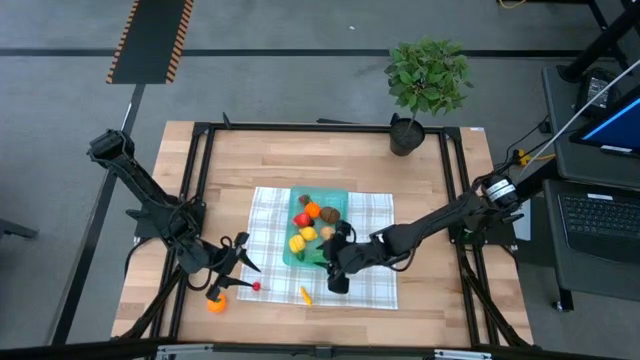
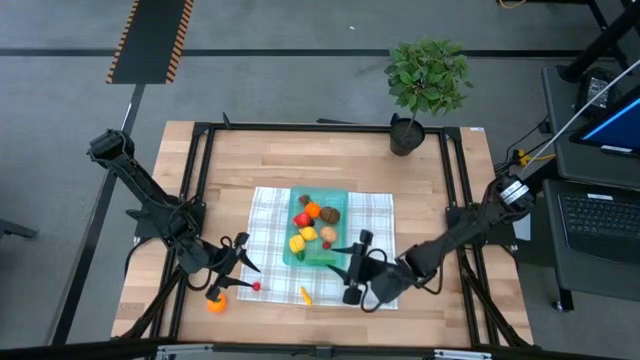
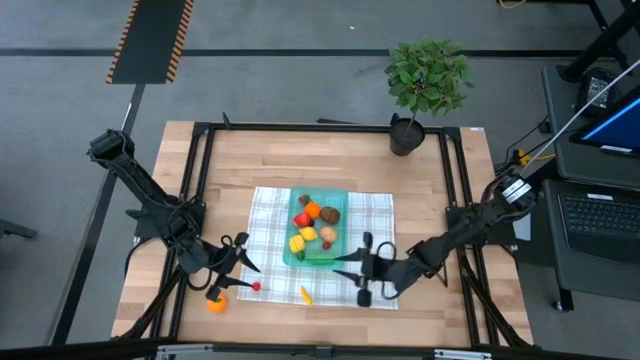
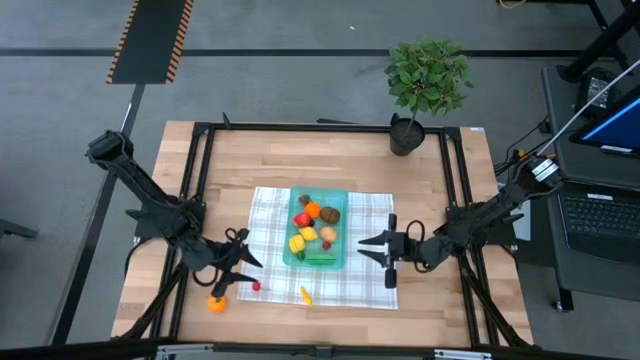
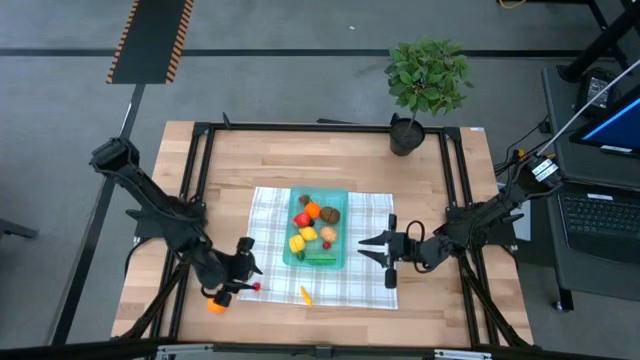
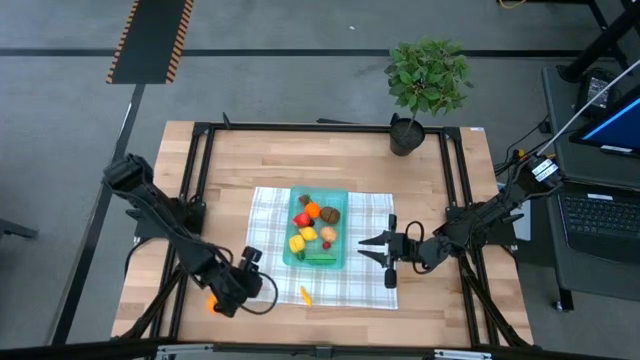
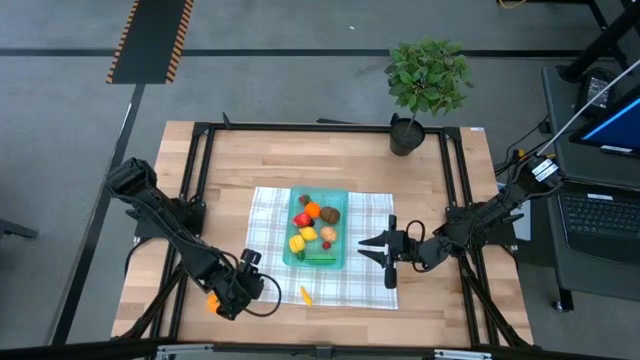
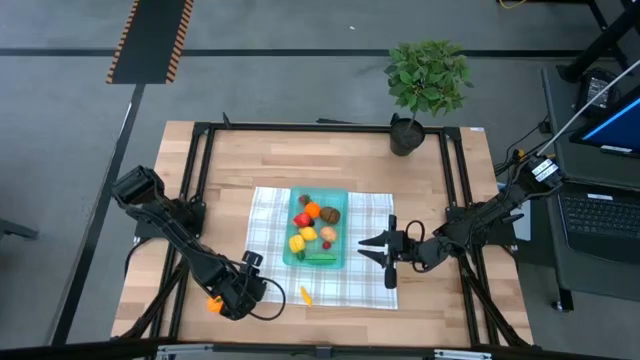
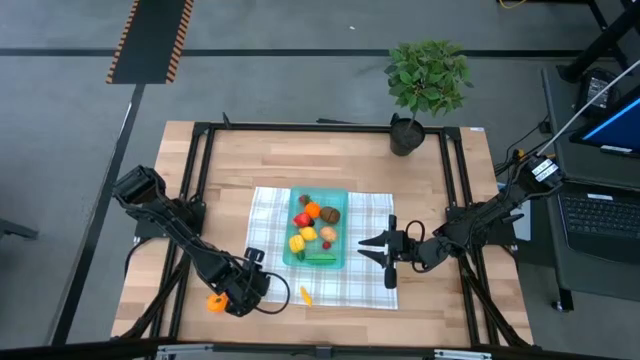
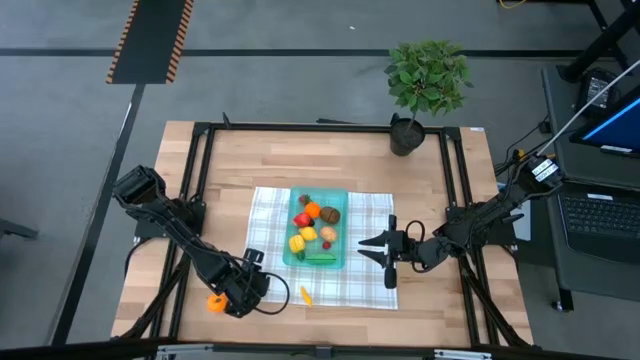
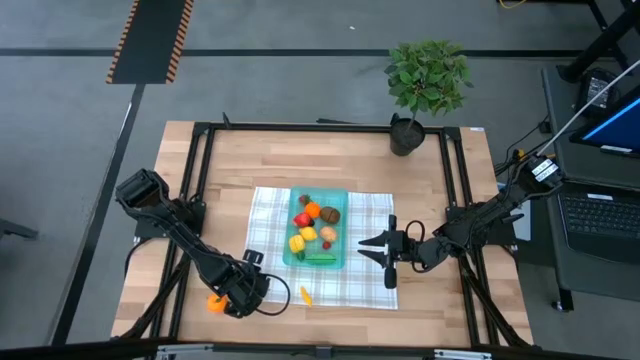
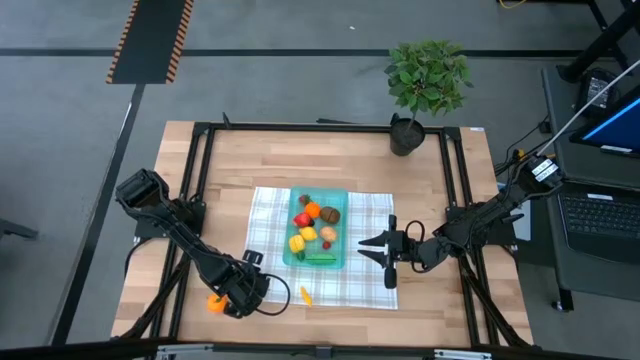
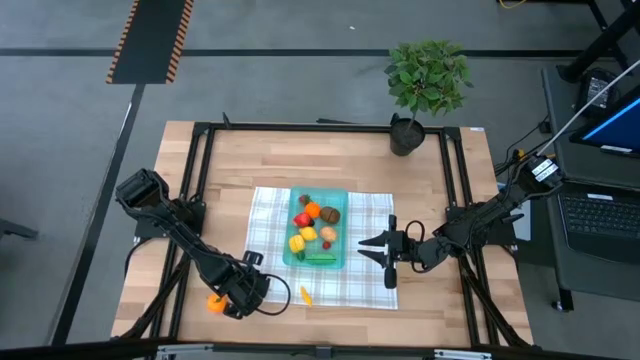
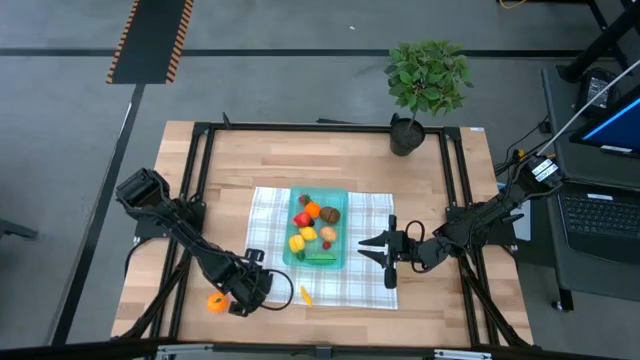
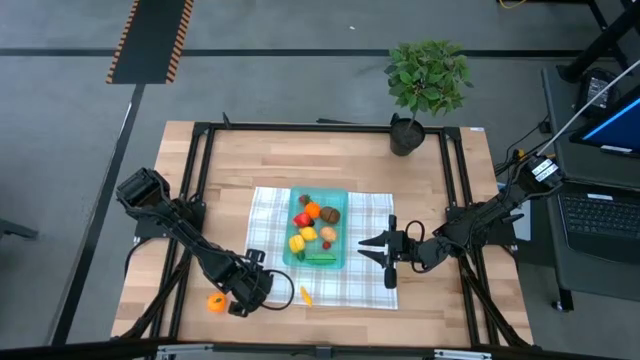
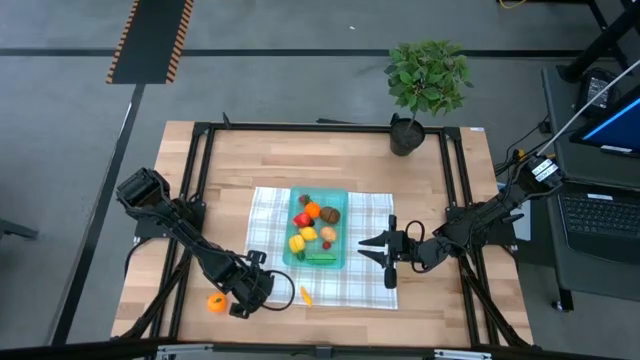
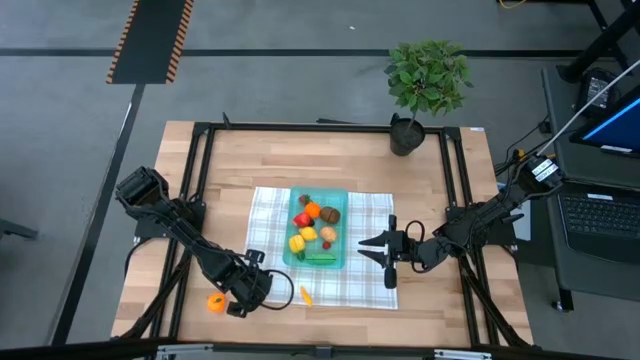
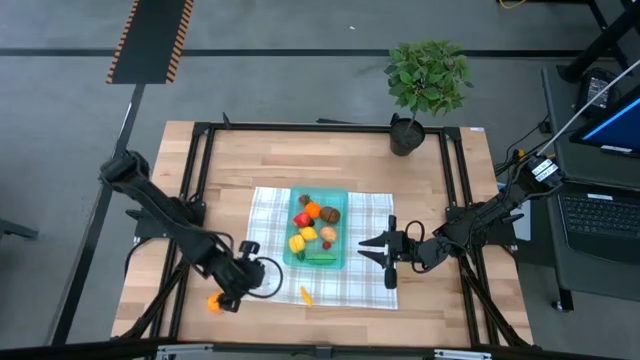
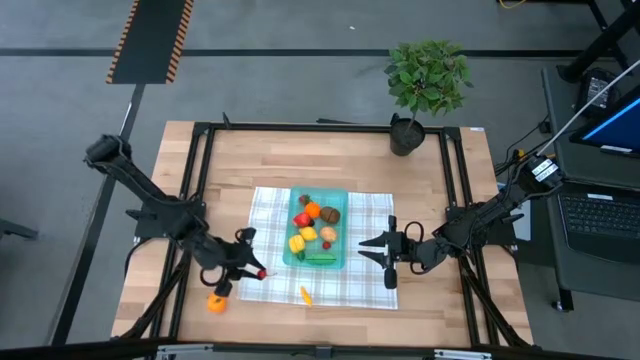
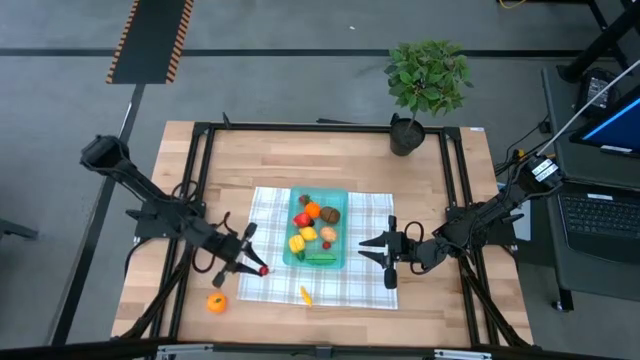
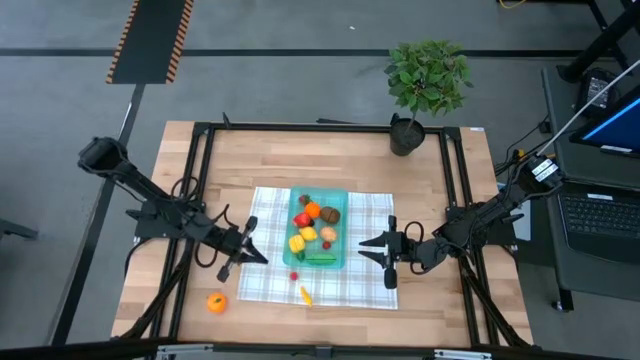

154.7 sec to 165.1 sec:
Task: Pick and placing Produce into tupperware
Put the red cherry into the blue bin

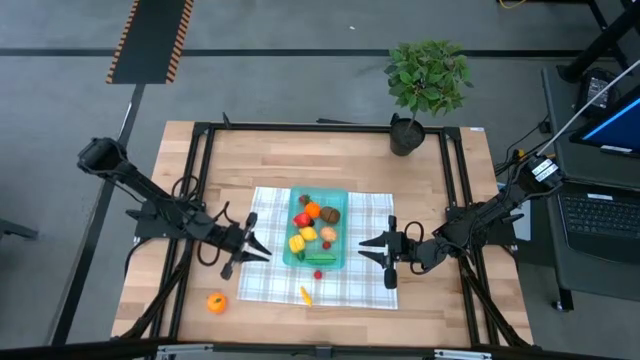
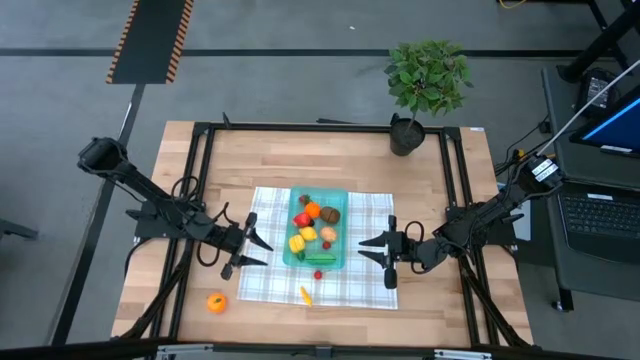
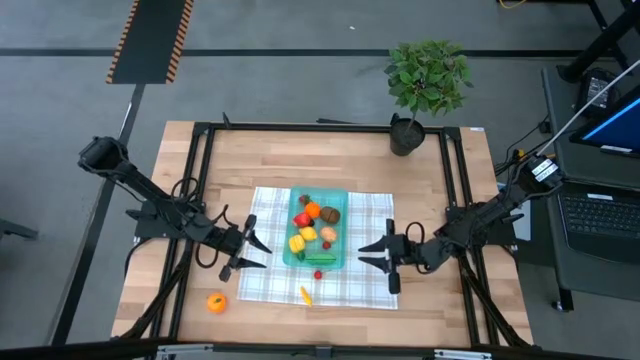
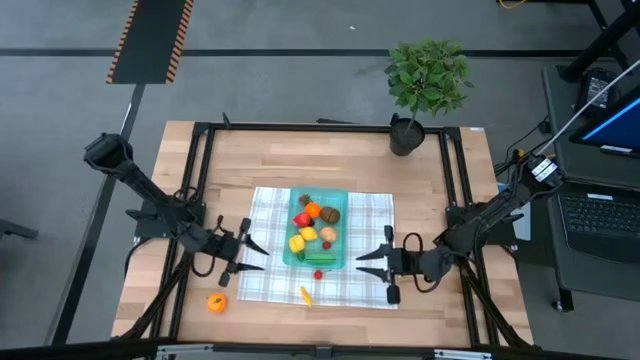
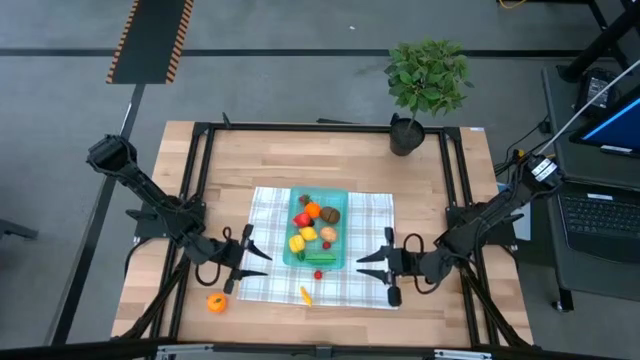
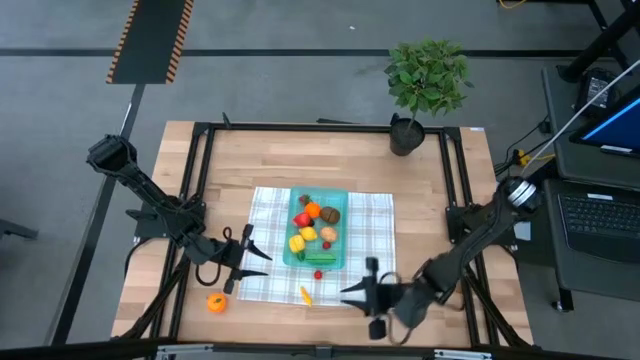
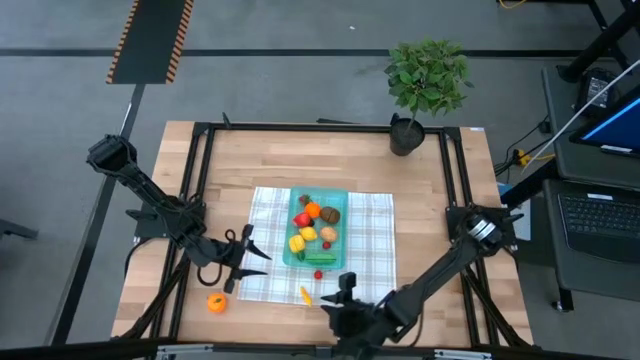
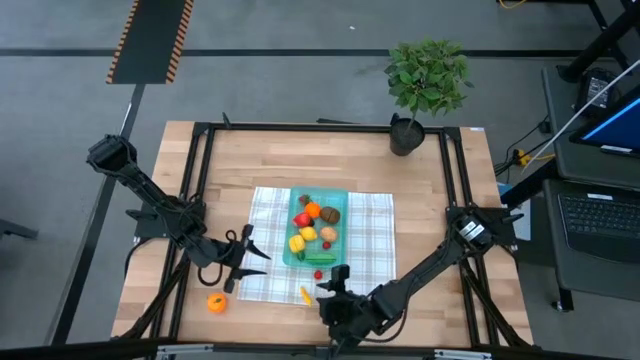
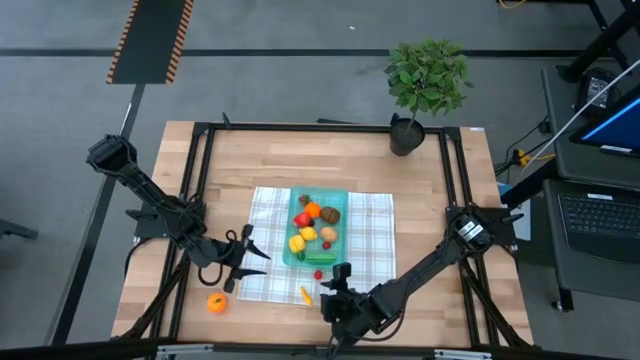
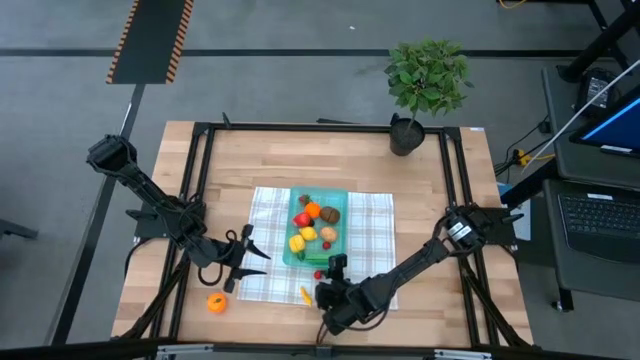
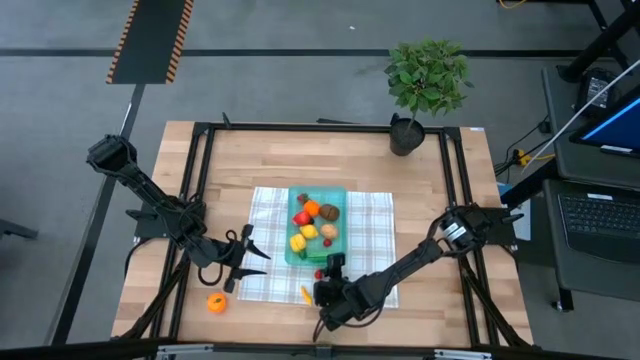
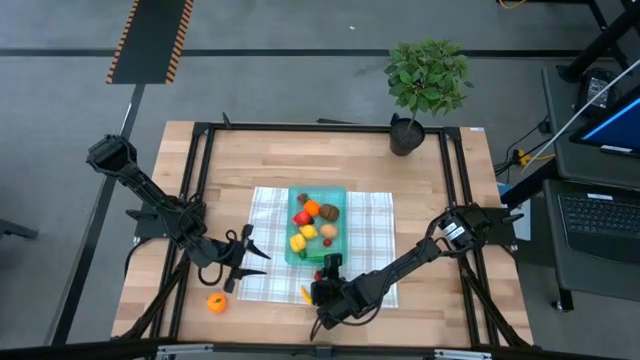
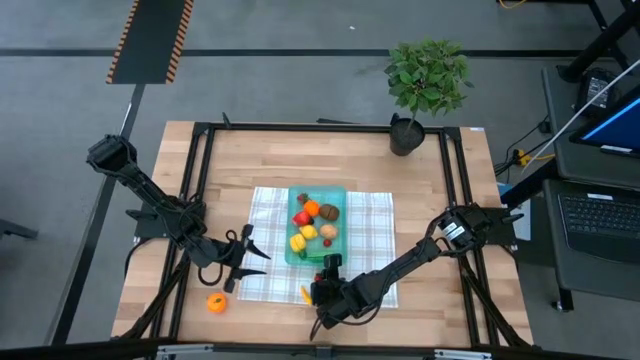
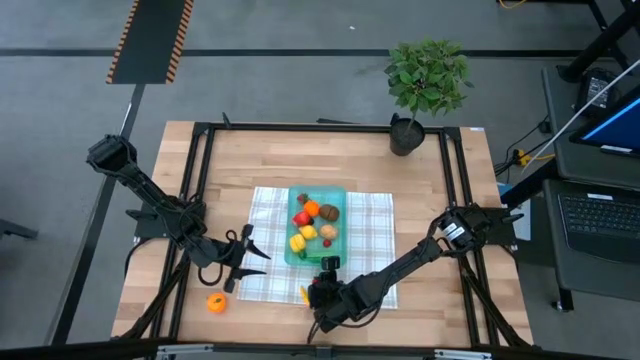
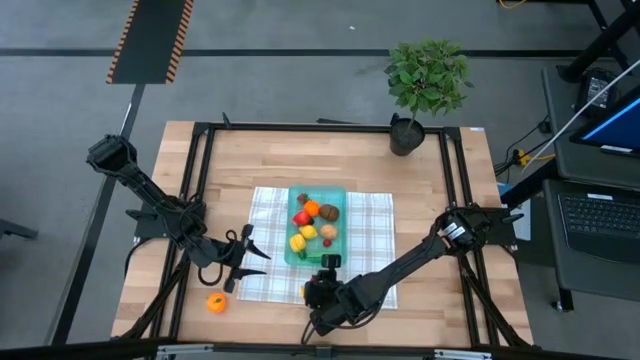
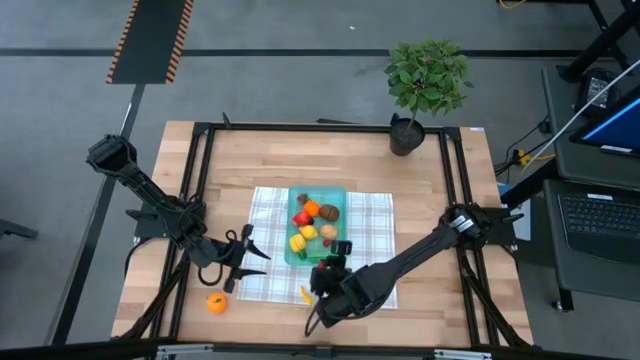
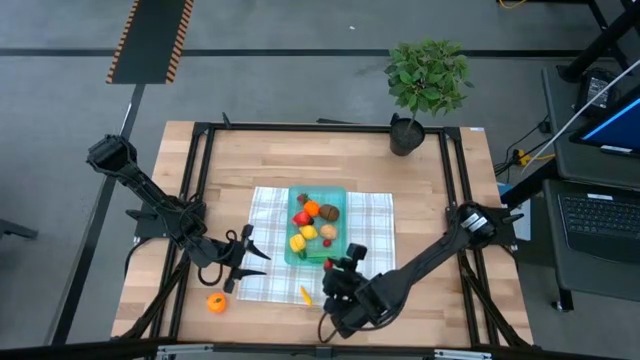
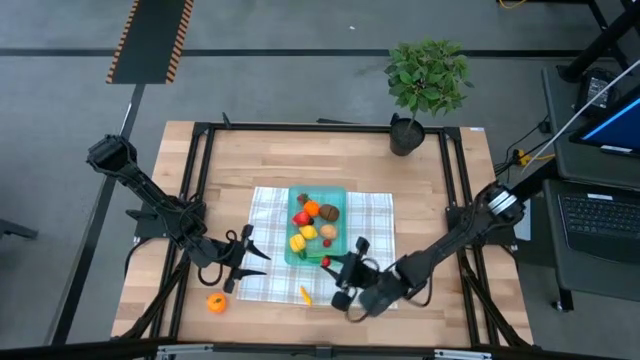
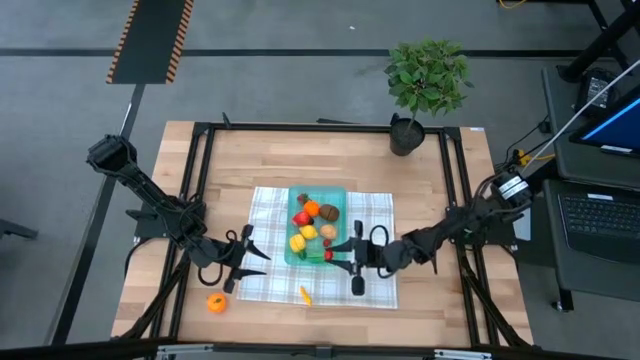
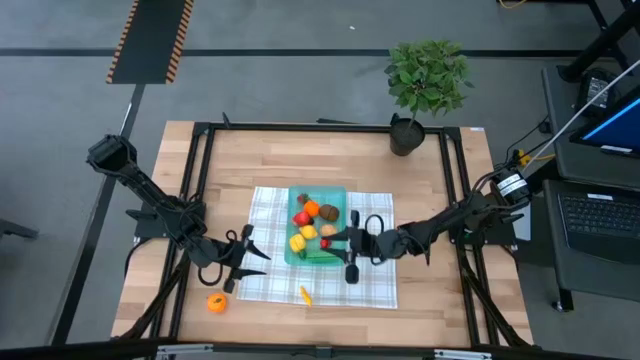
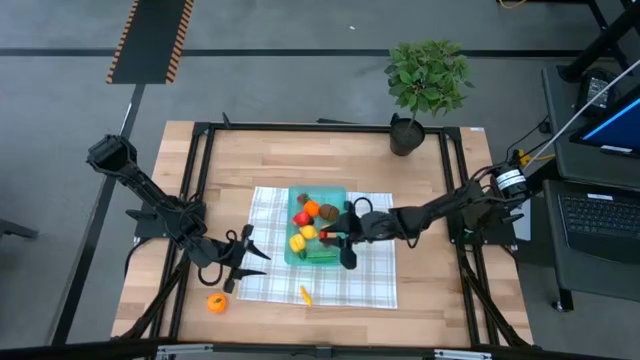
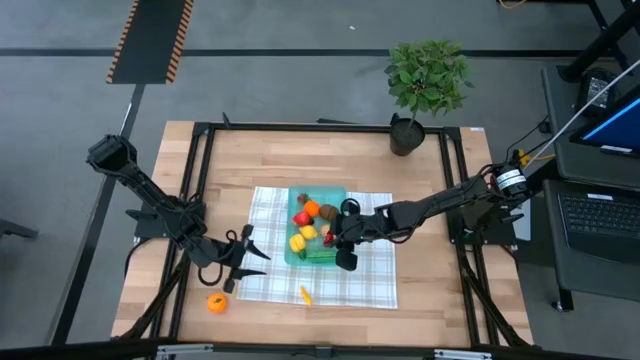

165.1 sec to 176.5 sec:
Put the red cherry into the blue bin
